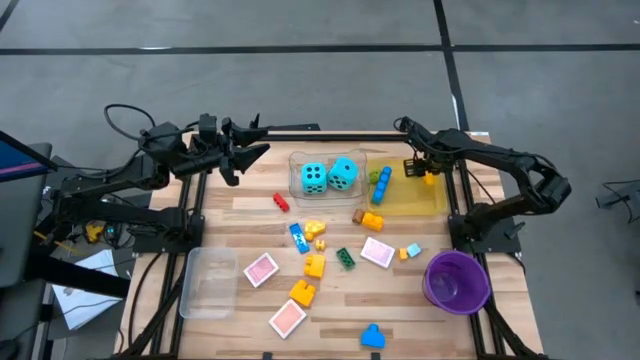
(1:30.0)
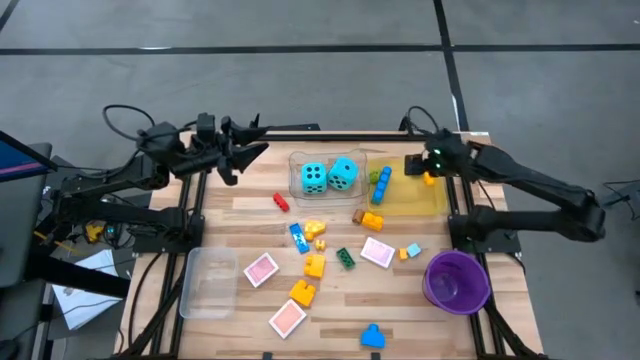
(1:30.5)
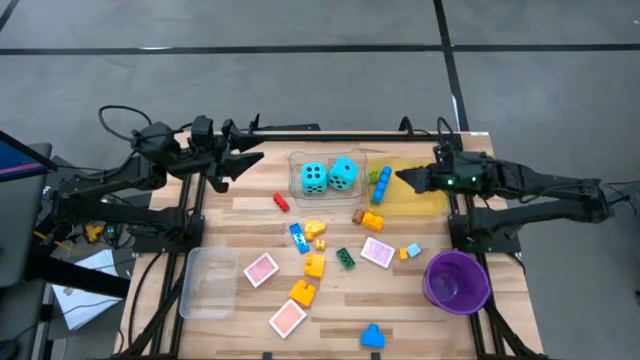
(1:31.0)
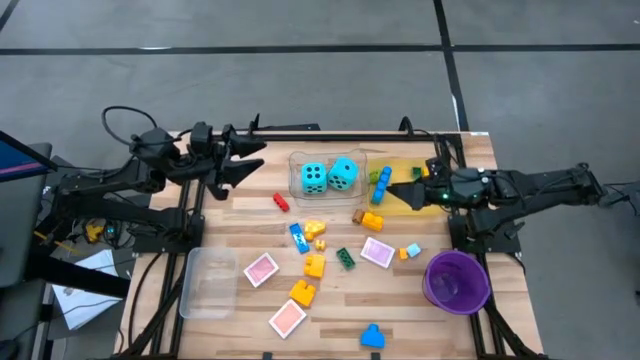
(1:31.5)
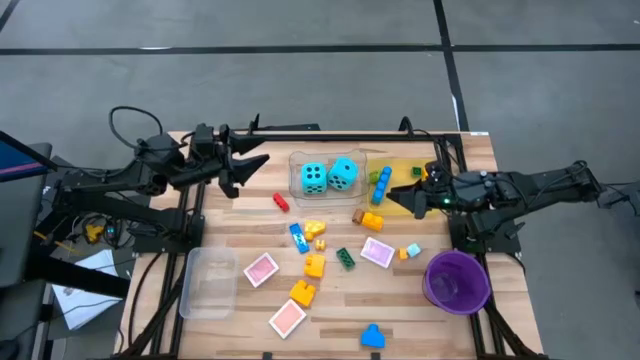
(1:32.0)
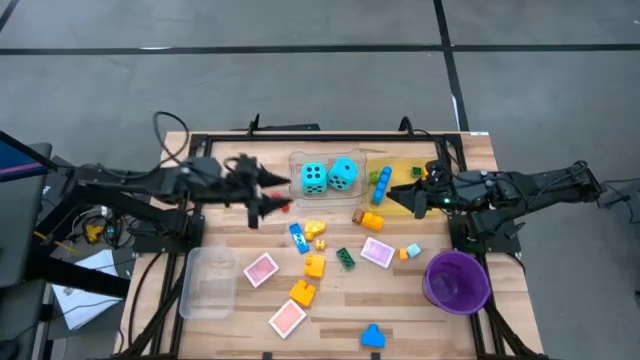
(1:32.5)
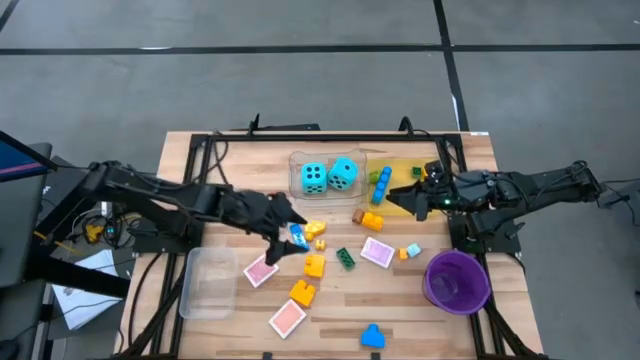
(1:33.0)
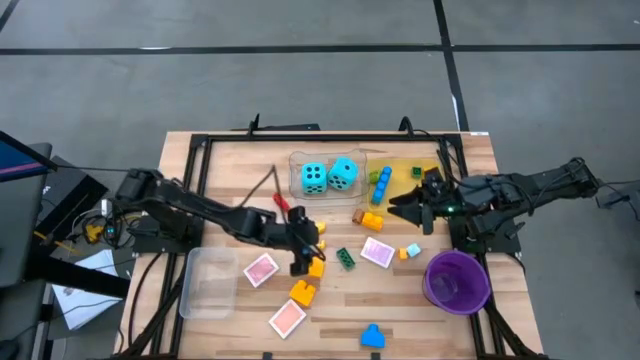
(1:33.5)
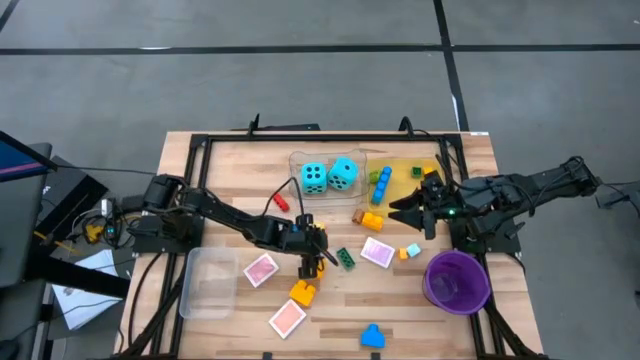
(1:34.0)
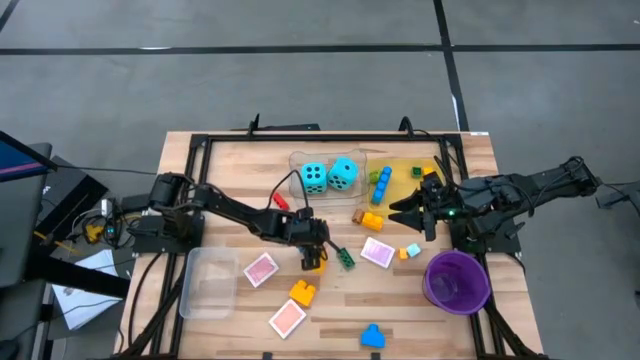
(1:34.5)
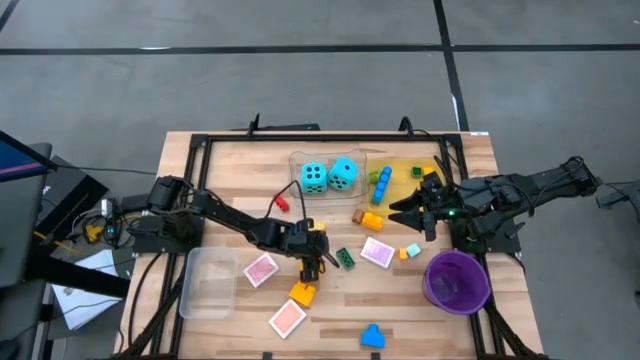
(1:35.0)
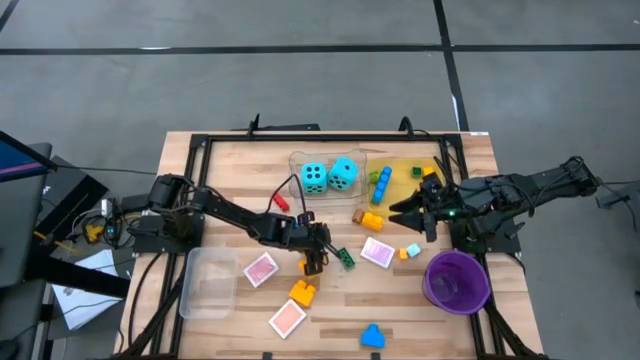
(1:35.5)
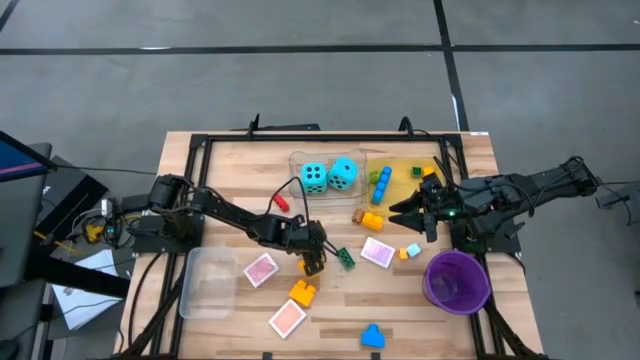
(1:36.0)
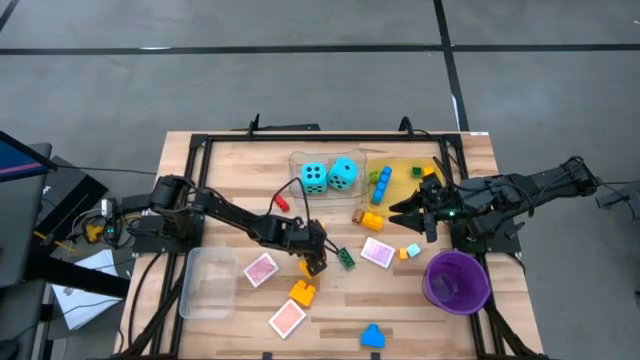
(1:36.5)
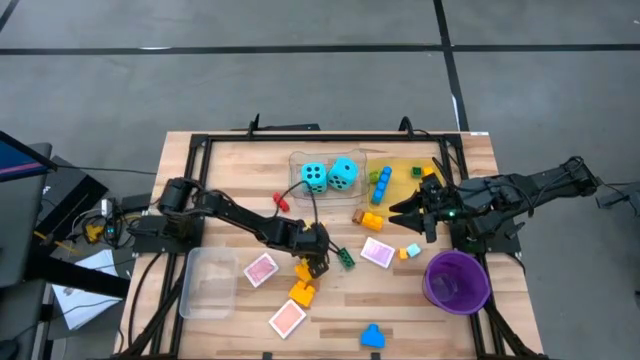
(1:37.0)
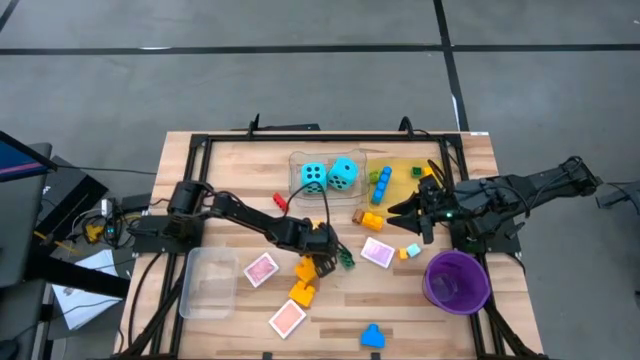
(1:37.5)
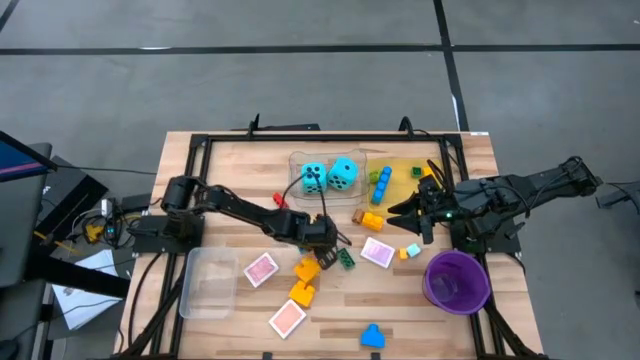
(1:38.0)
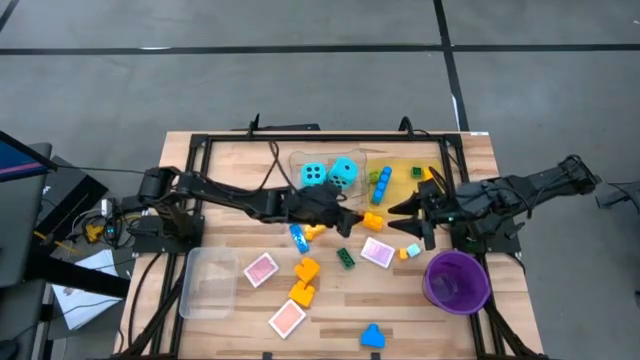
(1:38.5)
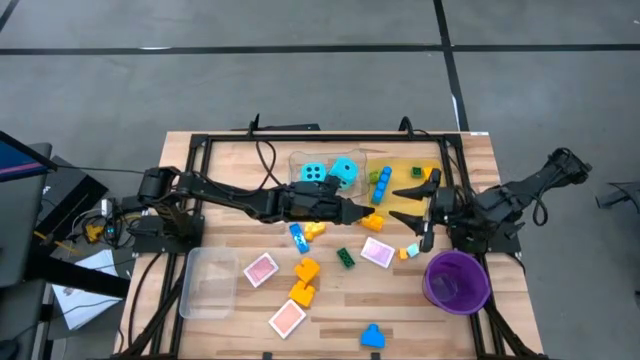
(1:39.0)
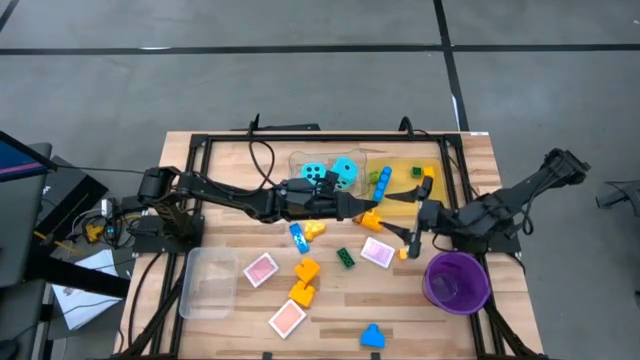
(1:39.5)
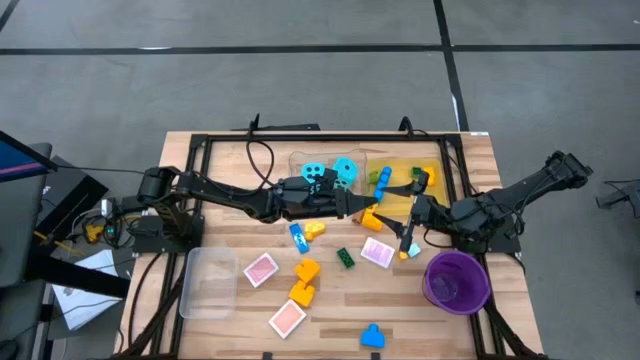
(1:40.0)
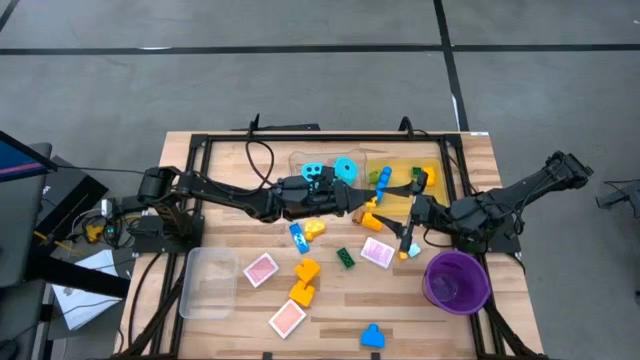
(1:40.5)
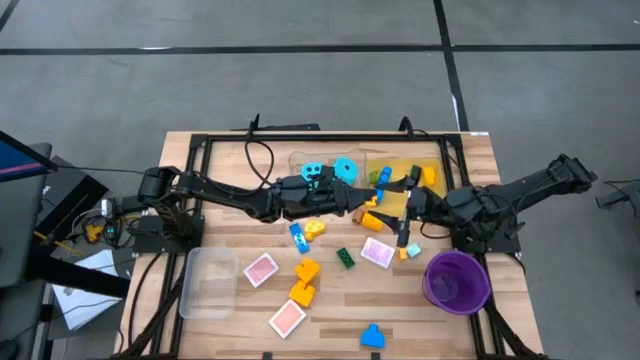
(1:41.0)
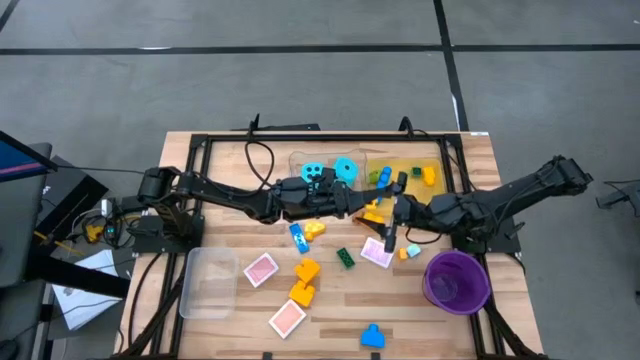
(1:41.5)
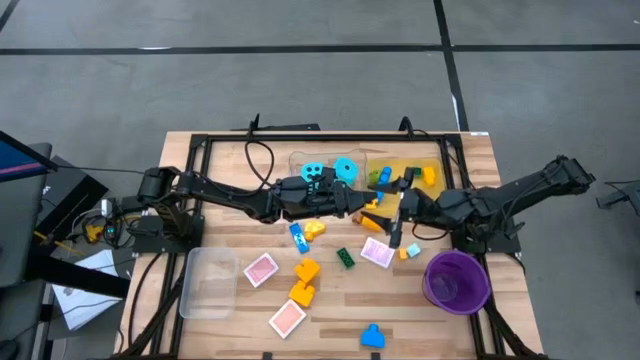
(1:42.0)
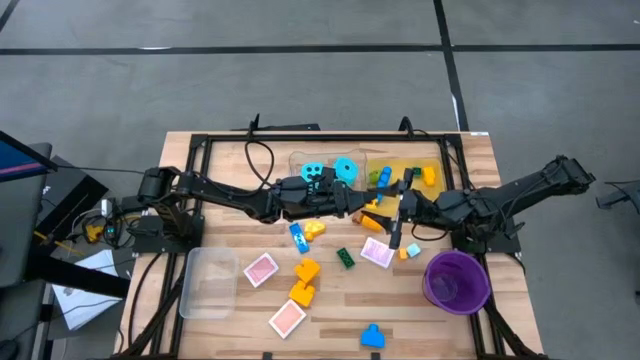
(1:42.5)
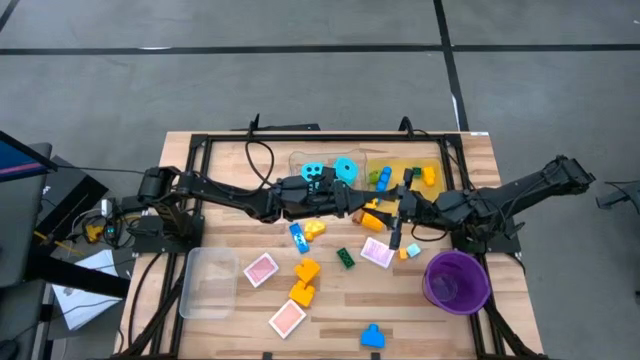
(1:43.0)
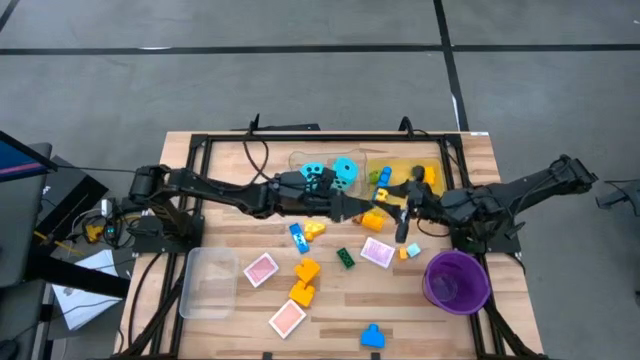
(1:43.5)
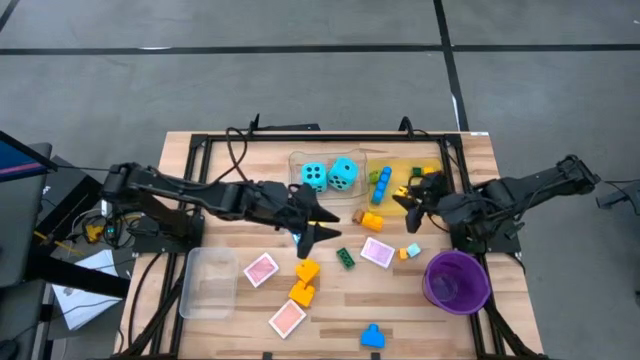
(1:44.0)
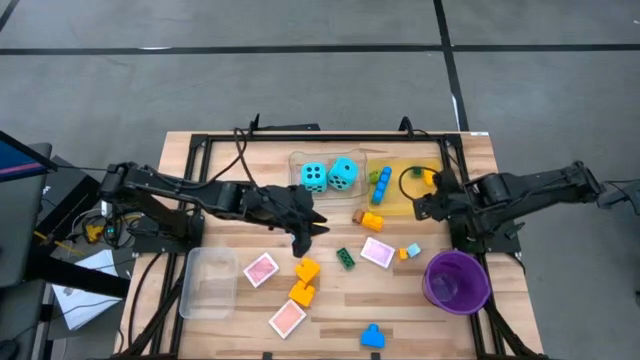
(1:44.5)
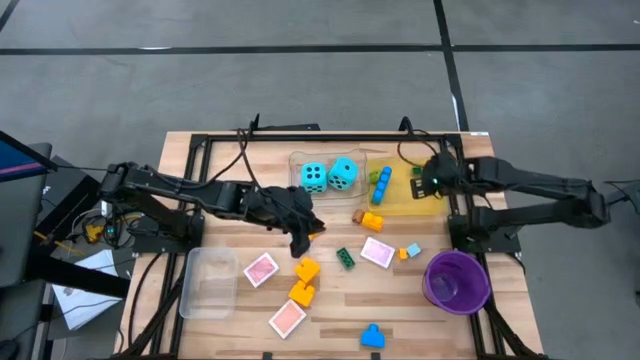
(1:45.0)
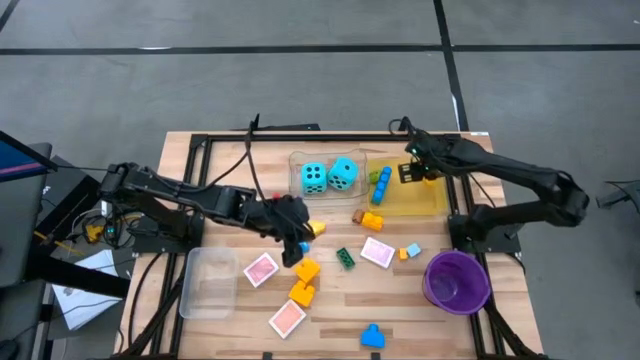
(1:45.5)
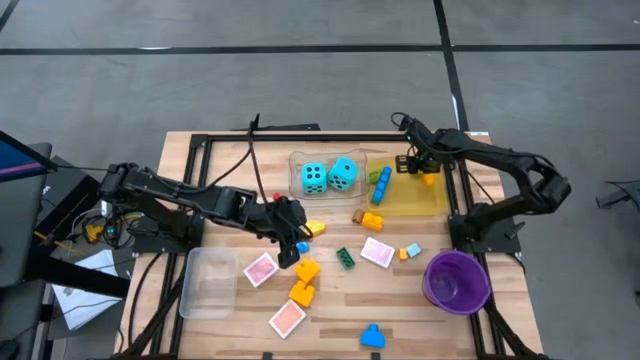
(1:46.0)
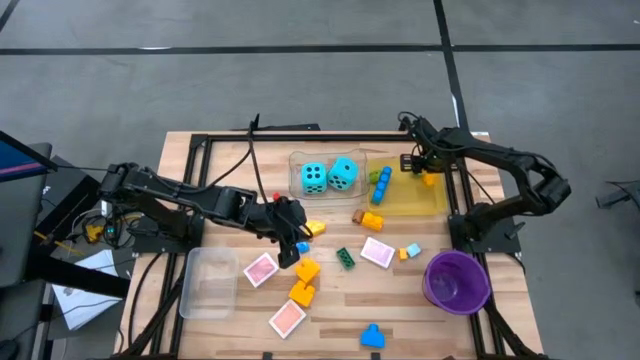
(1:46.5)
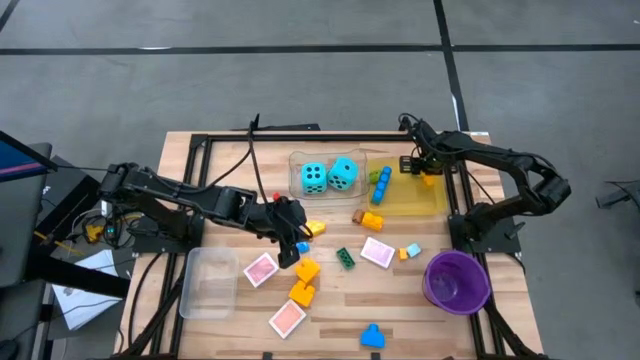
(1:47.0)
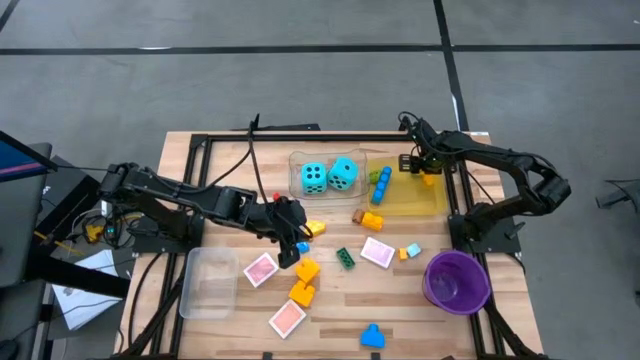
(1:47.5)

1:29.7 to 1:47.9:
Task: Pick & Place Toys
Put the yellow game piece into the yellow bin

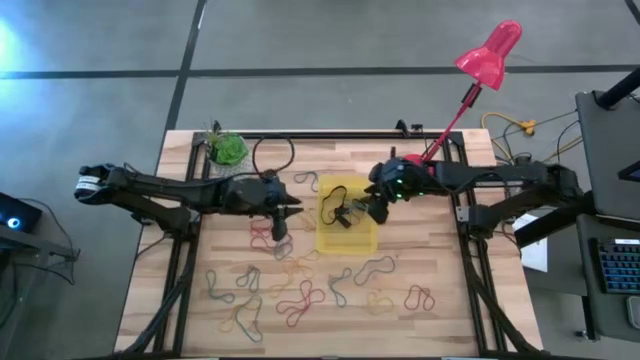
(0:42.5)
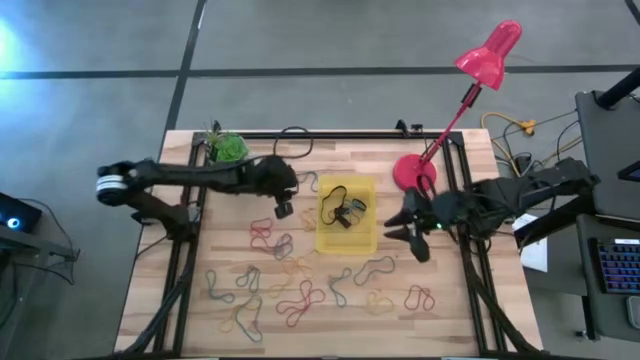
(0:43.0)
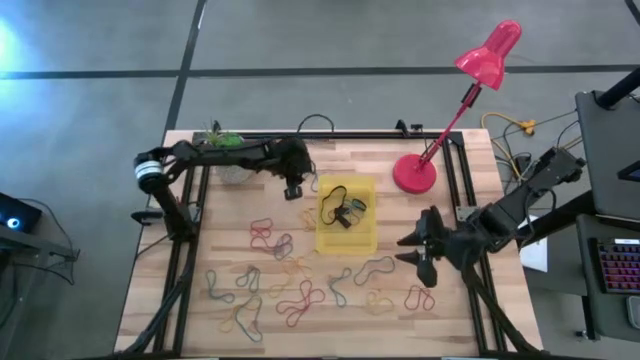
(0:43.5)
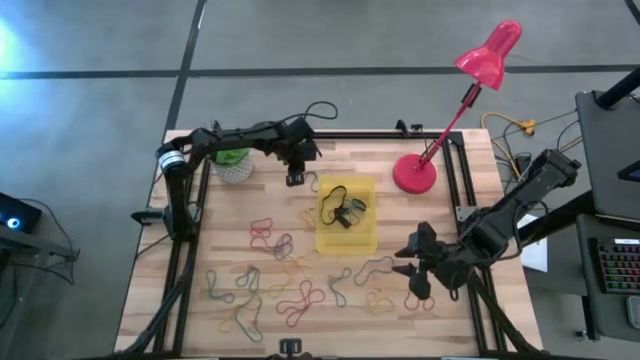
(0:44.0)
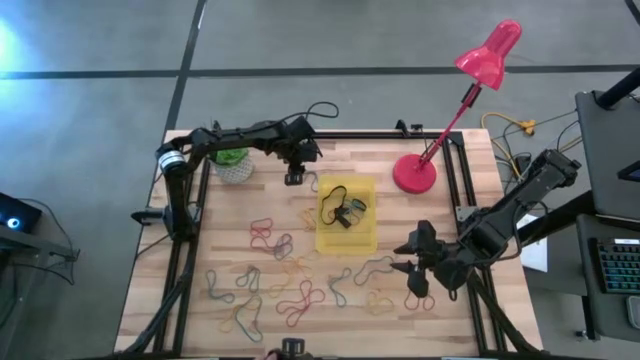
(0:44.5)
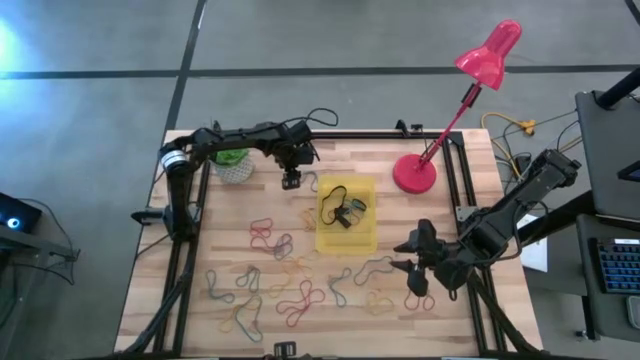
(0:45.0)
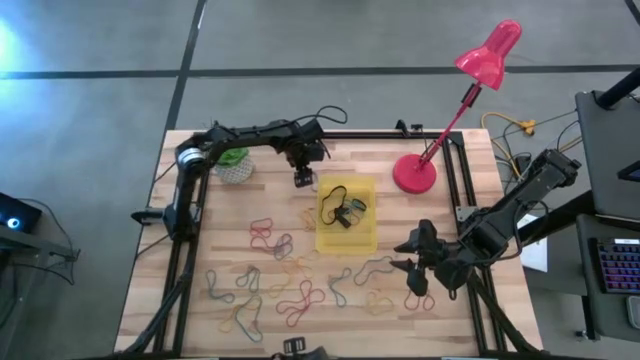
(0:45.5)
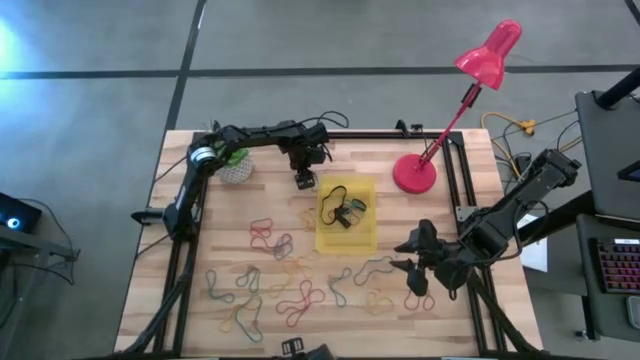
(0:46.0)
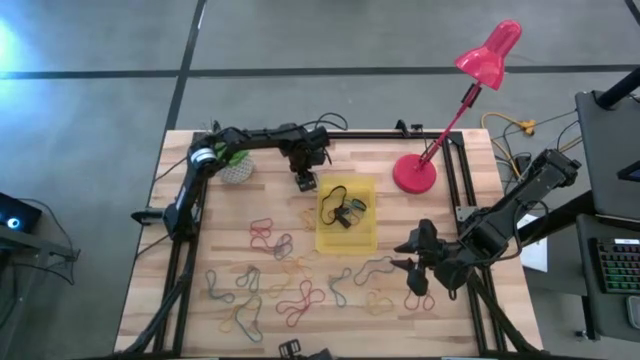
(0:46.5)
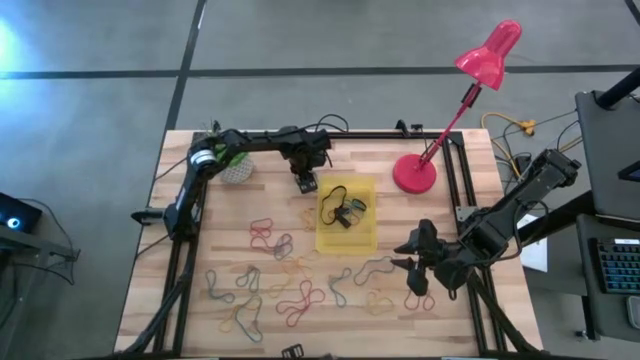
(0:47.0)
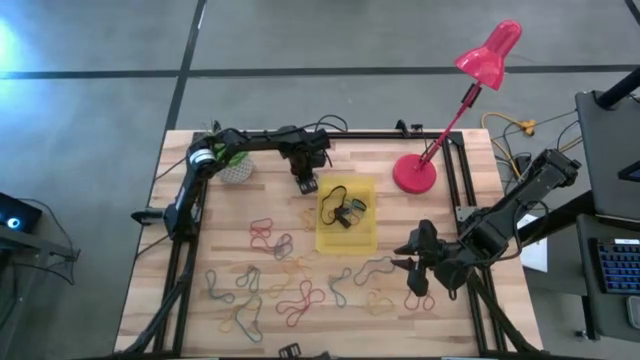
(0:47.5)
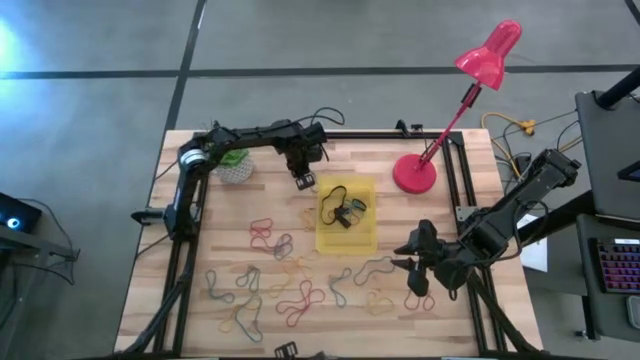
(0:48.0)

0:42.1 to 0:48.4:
Task: Pick and place rubber bands into bin
Put the blue rubber band into the bin
